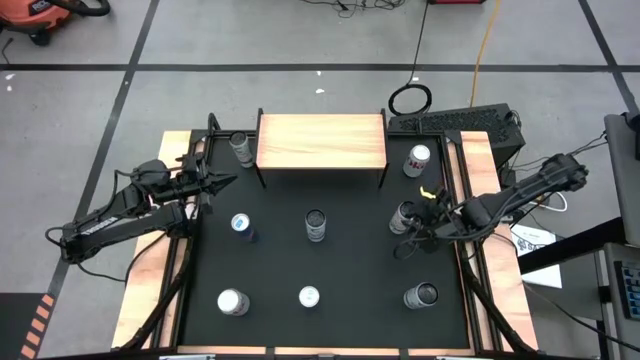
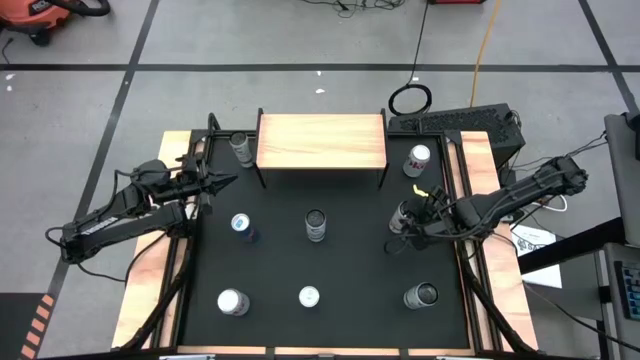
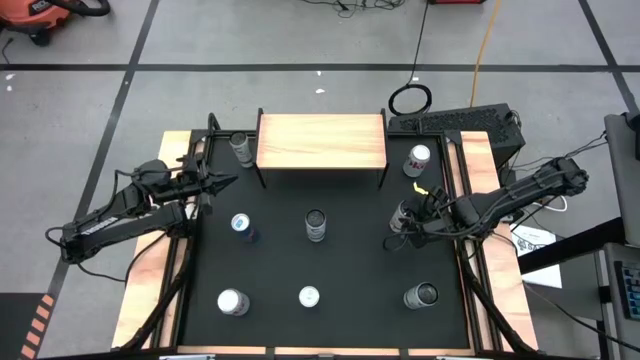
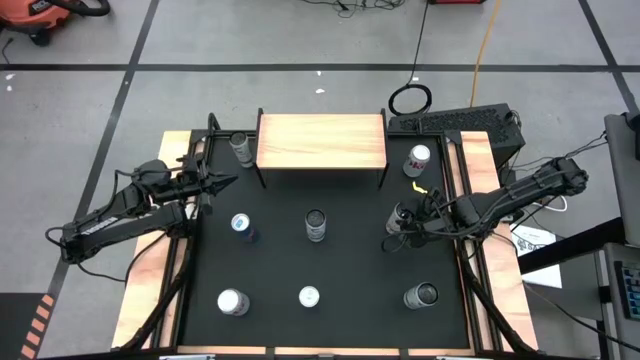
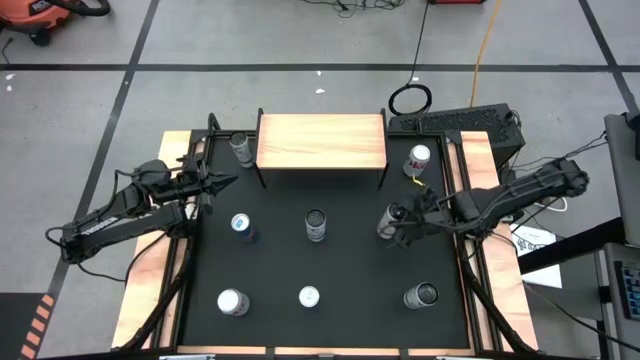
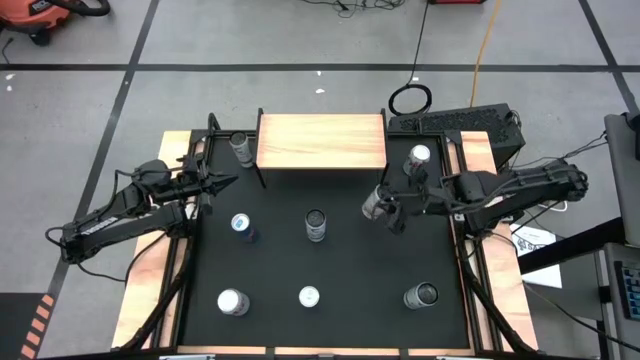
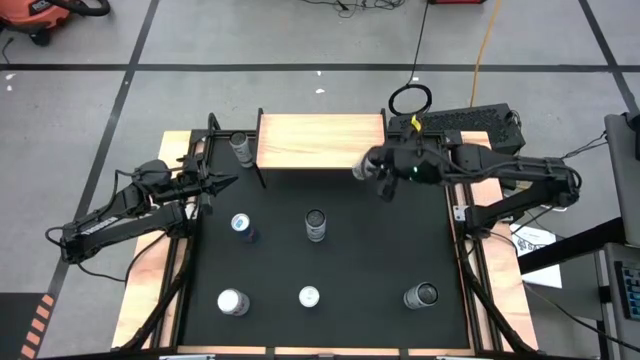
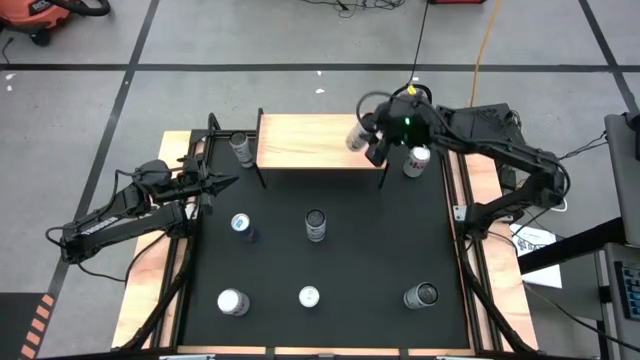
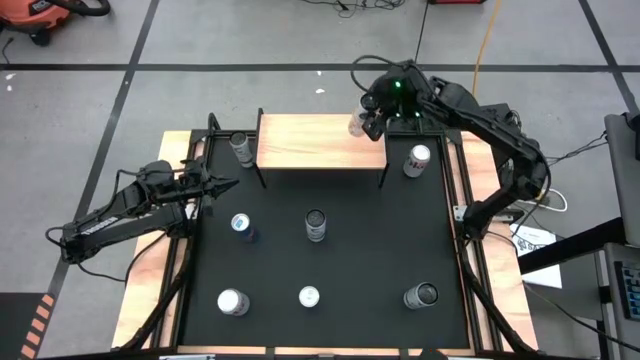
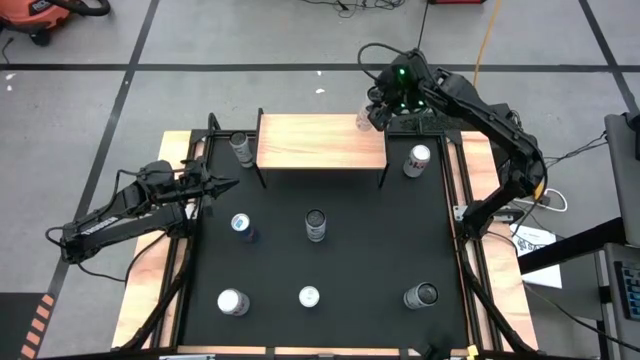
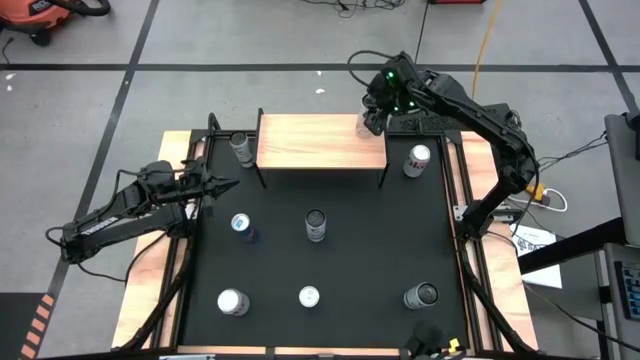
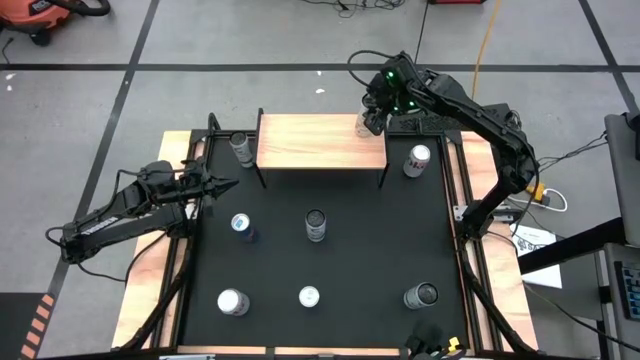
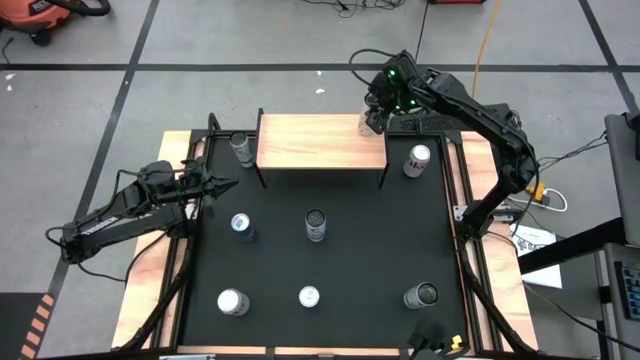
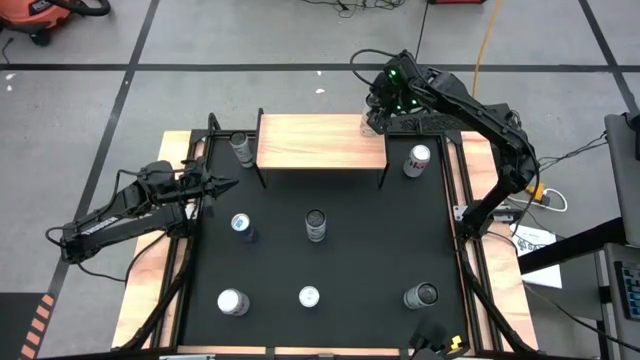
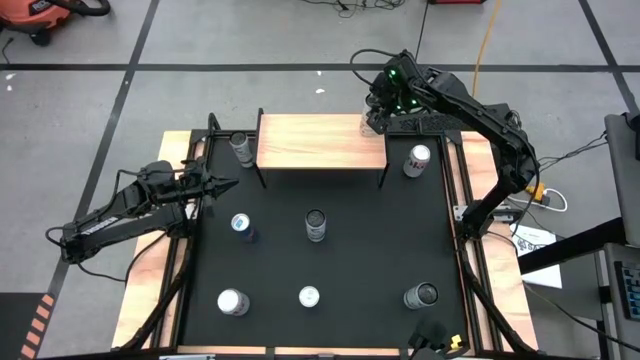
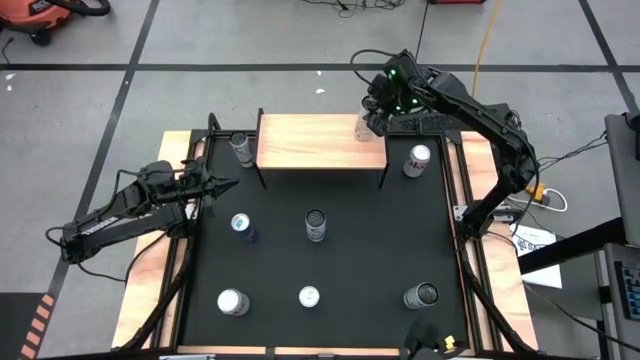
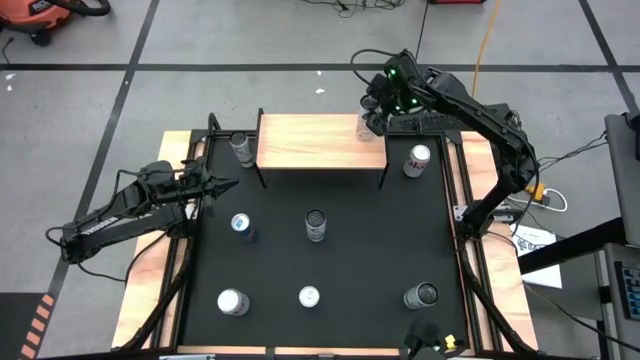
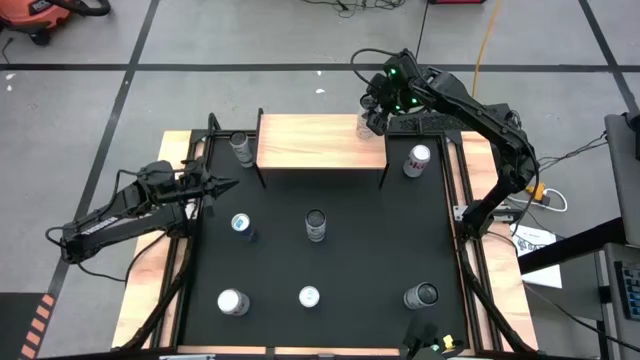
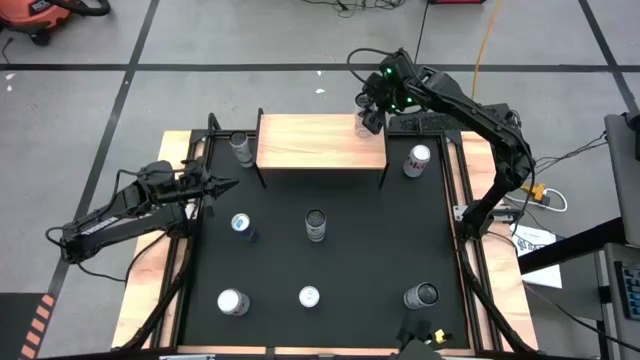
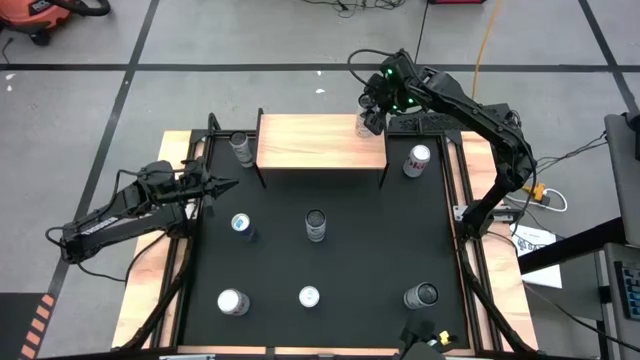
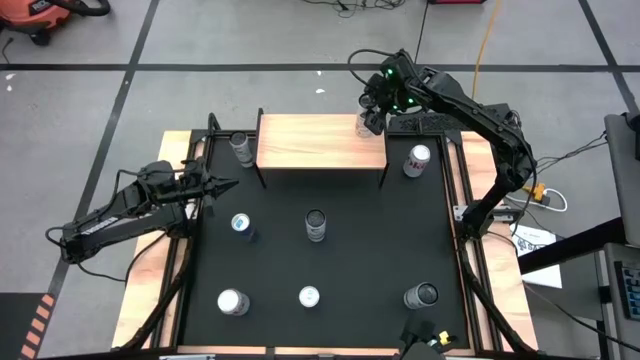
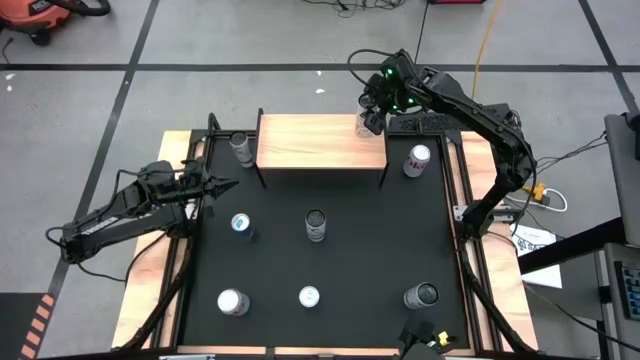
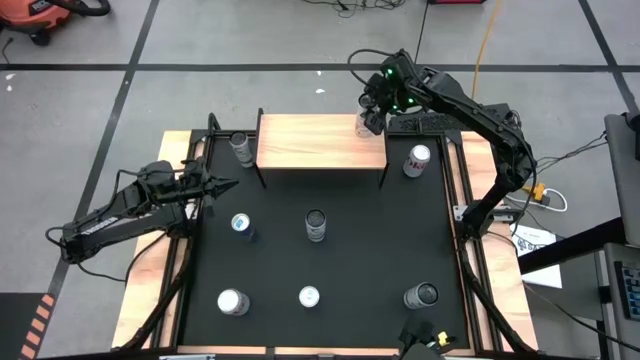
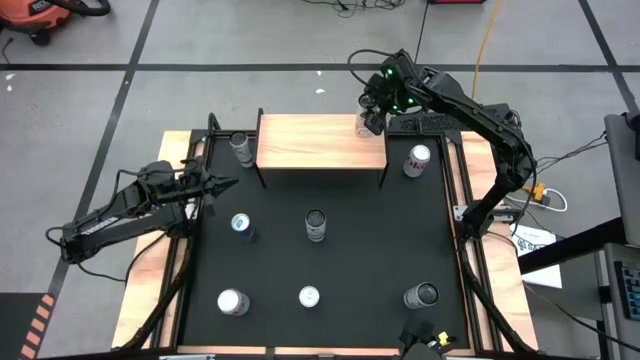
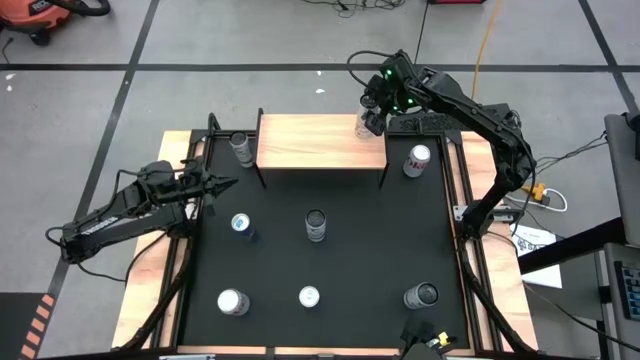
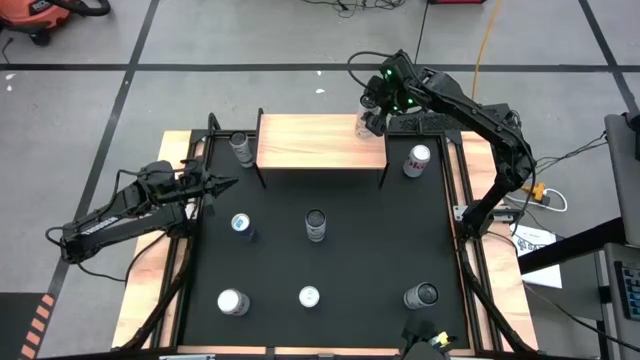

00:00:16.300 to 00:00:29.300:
Task: Place canned beverage on shelf
Put the right white yellow soda can on the shelf
